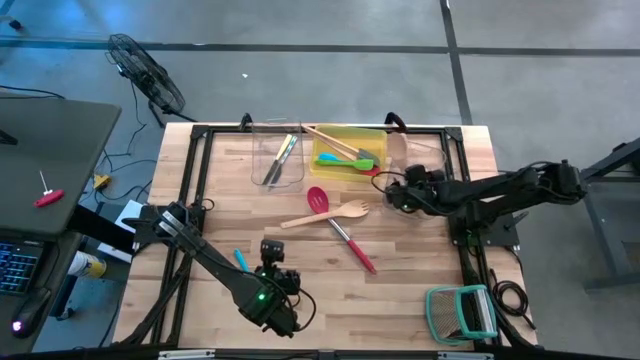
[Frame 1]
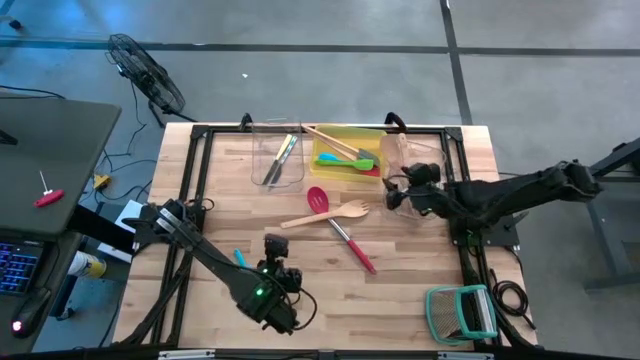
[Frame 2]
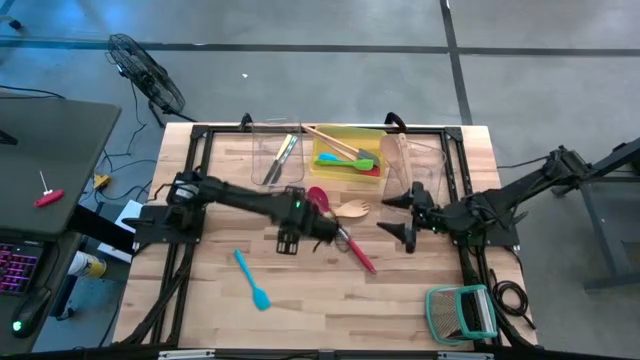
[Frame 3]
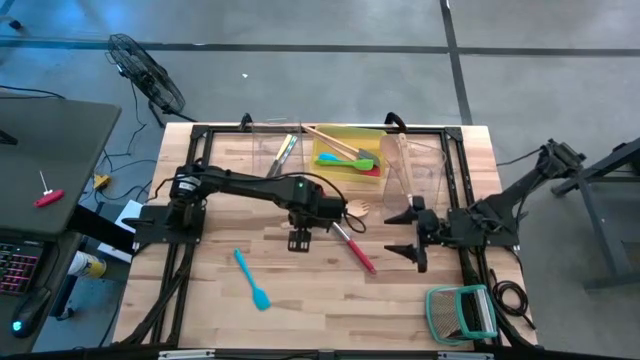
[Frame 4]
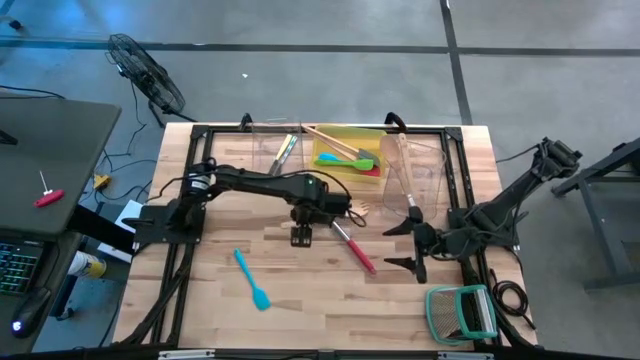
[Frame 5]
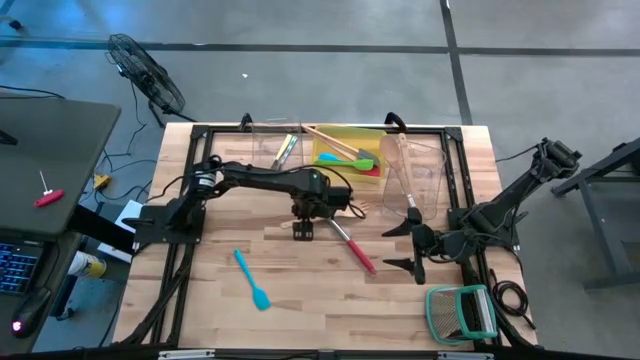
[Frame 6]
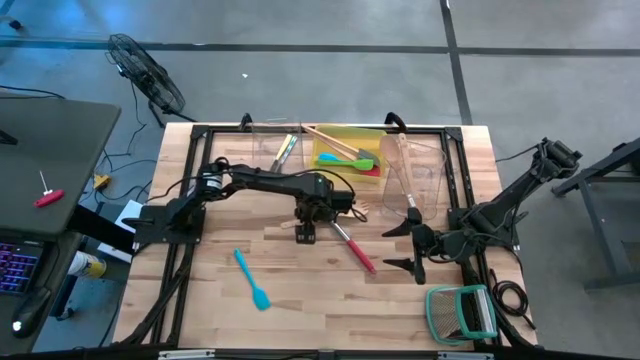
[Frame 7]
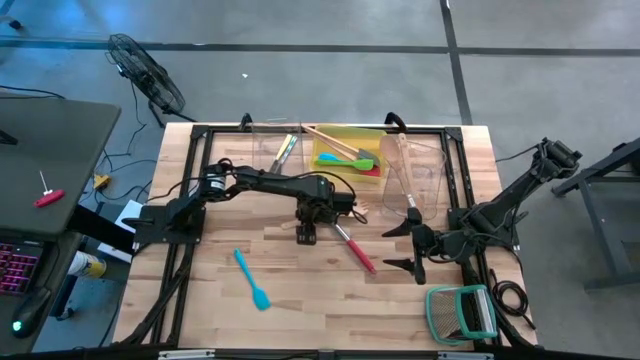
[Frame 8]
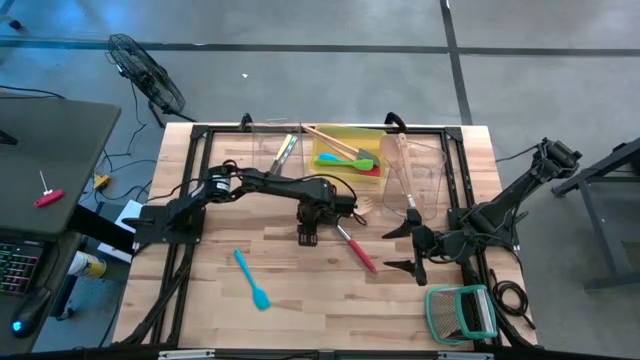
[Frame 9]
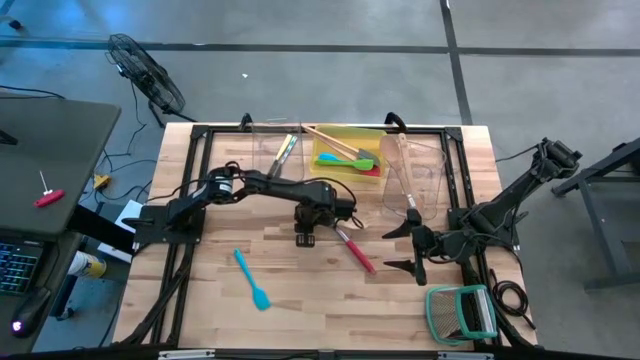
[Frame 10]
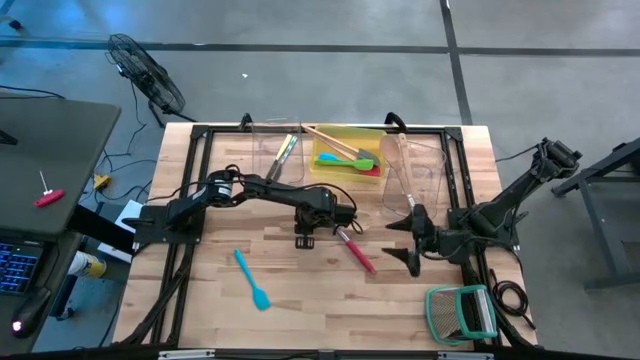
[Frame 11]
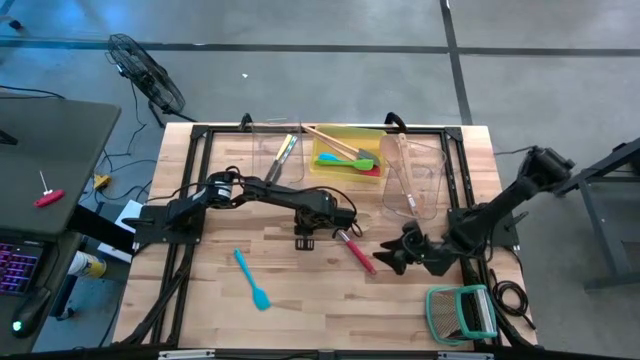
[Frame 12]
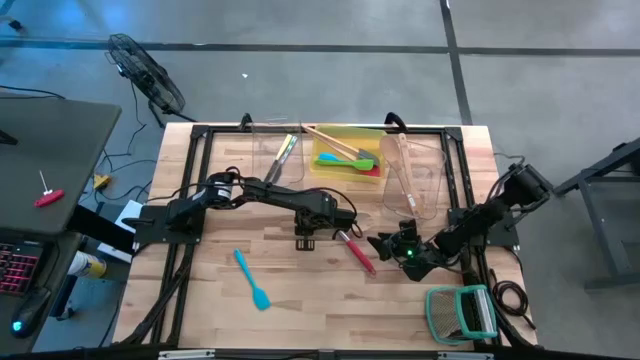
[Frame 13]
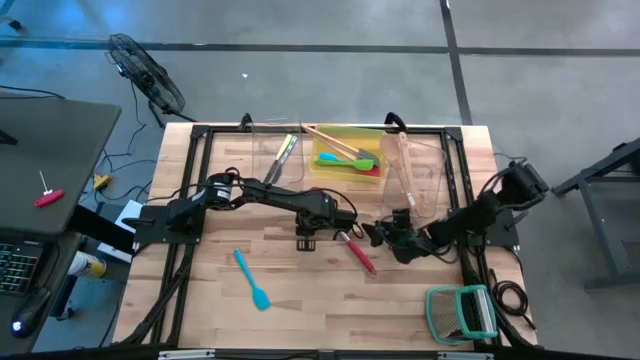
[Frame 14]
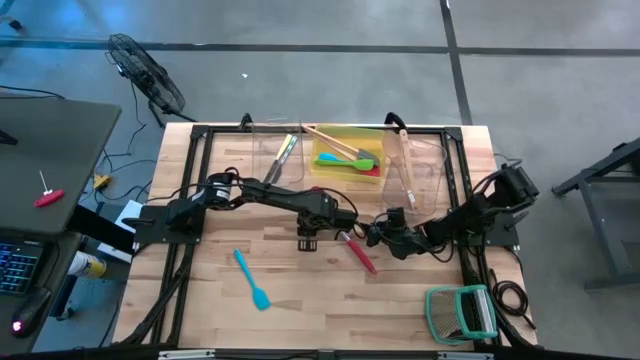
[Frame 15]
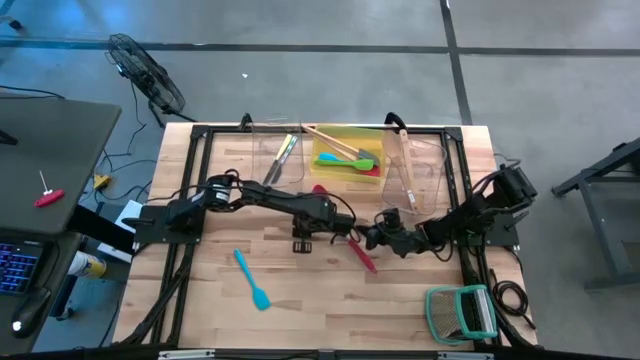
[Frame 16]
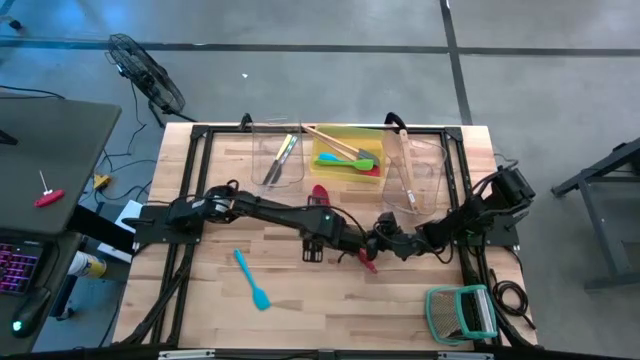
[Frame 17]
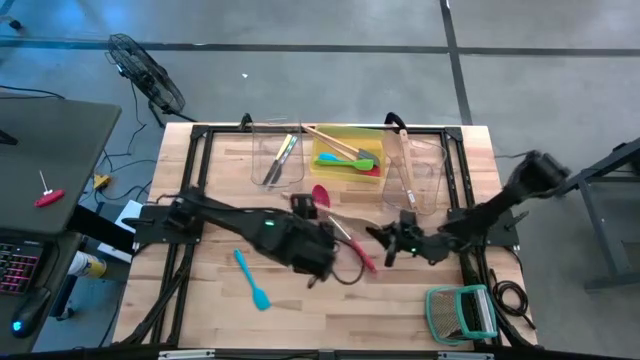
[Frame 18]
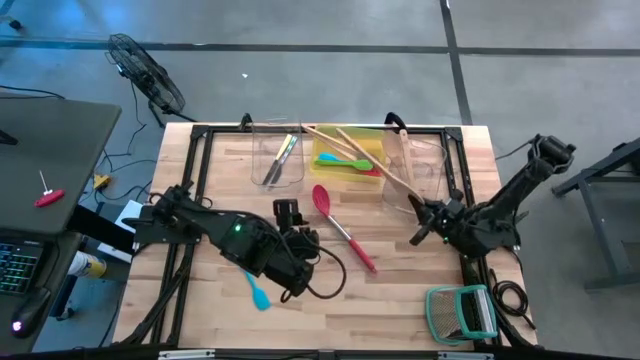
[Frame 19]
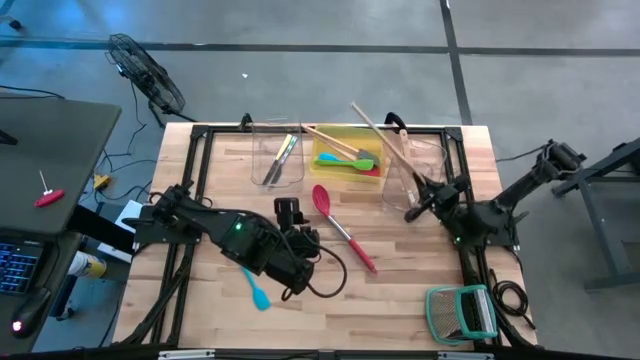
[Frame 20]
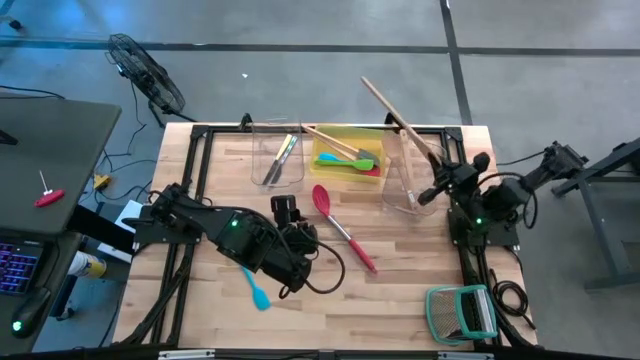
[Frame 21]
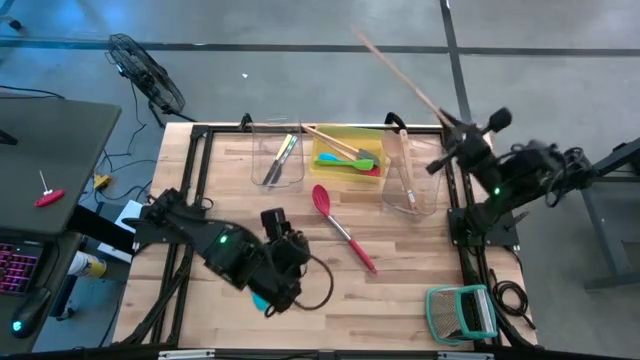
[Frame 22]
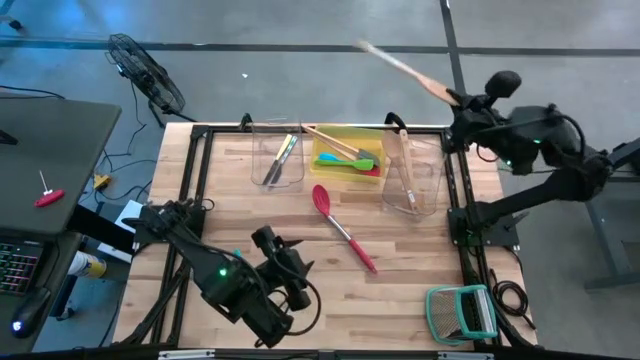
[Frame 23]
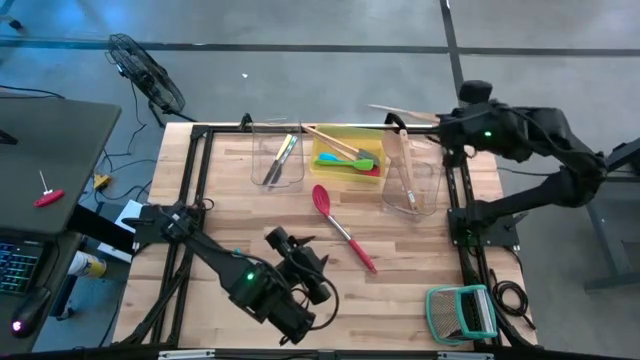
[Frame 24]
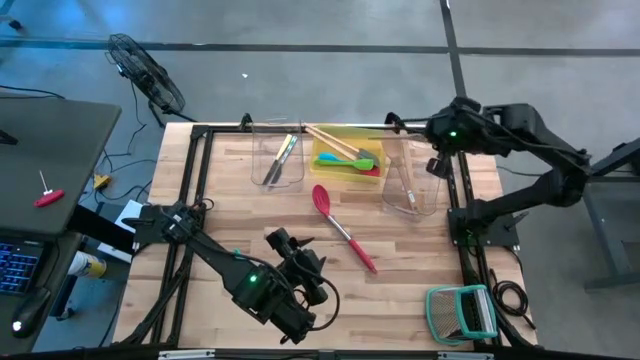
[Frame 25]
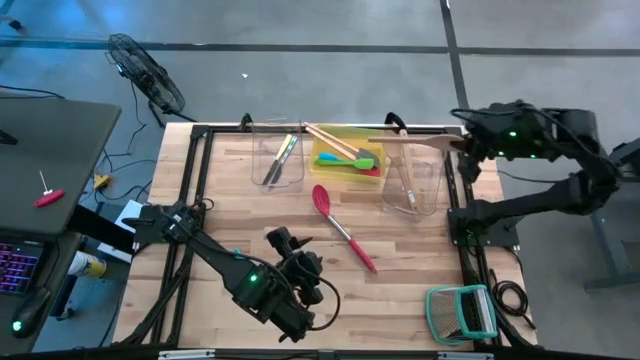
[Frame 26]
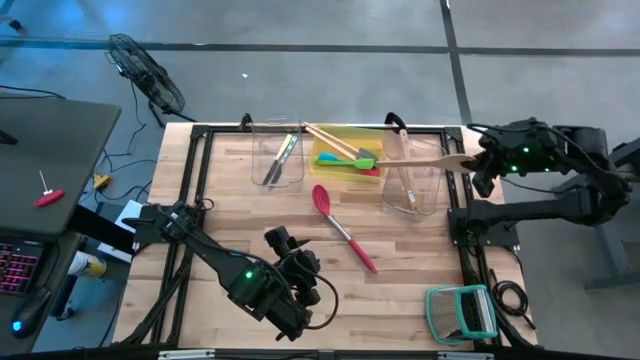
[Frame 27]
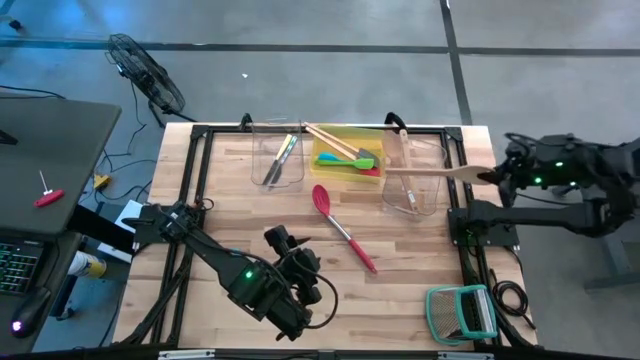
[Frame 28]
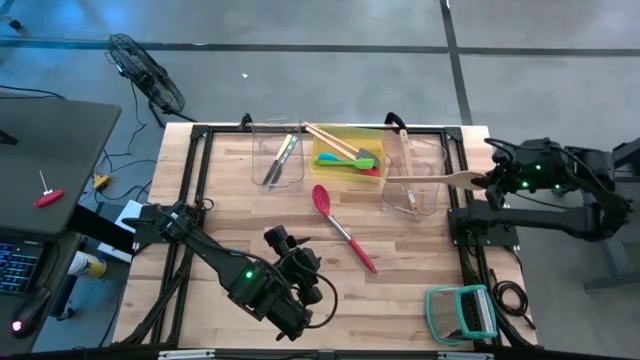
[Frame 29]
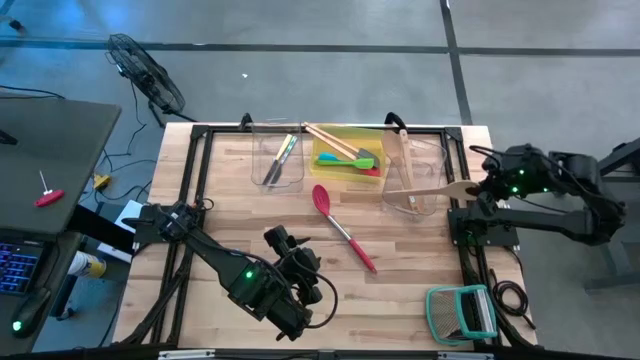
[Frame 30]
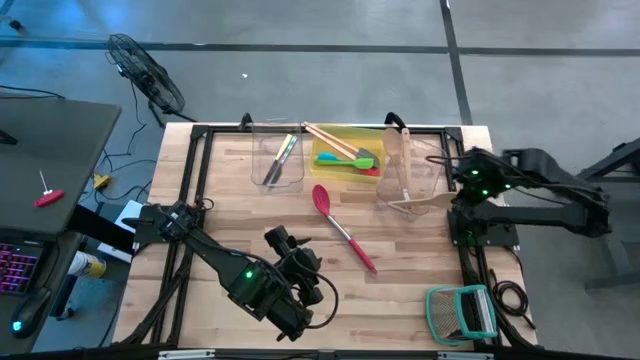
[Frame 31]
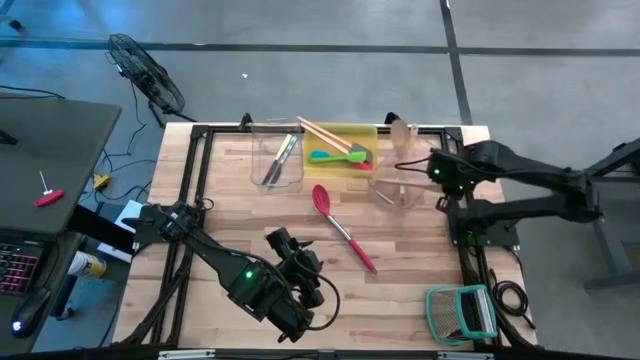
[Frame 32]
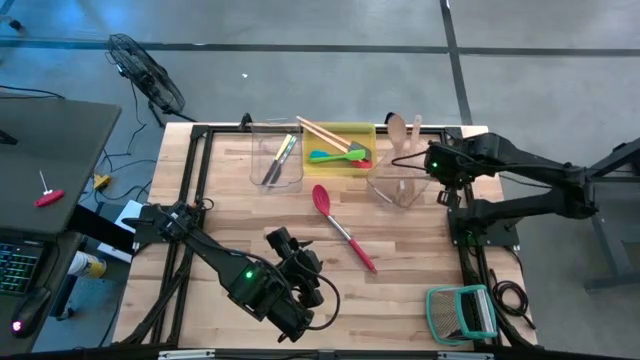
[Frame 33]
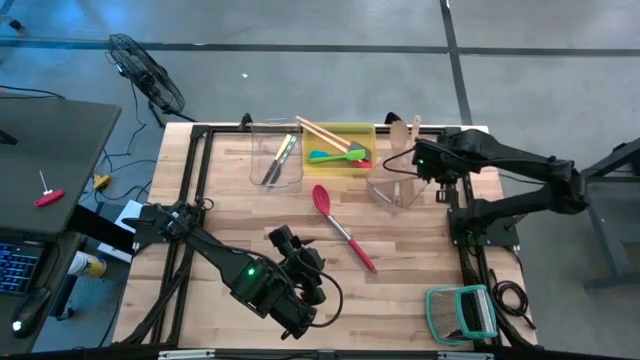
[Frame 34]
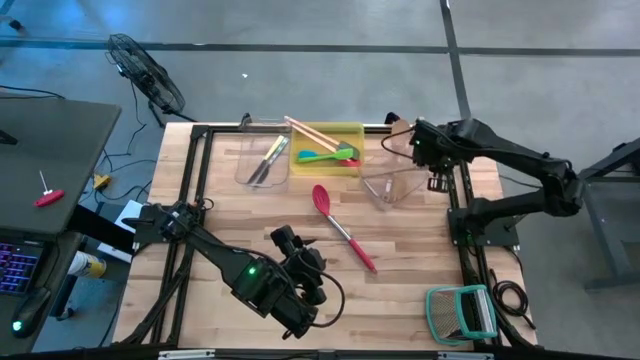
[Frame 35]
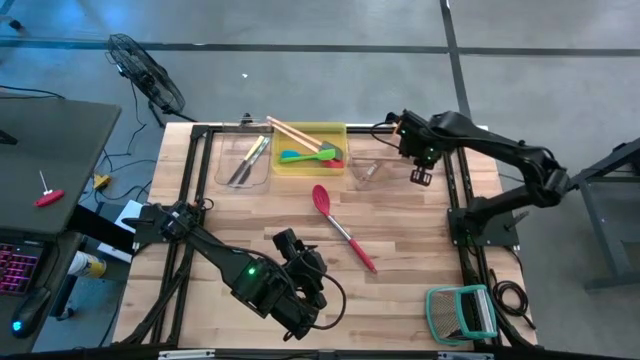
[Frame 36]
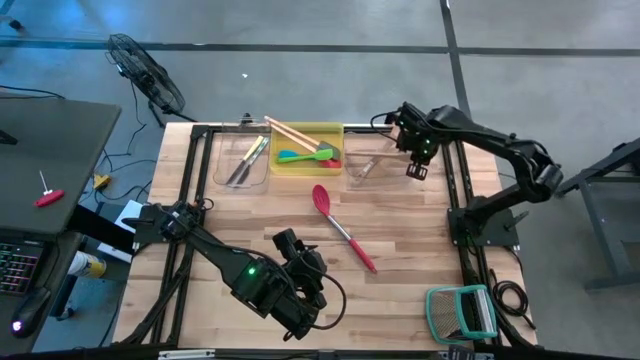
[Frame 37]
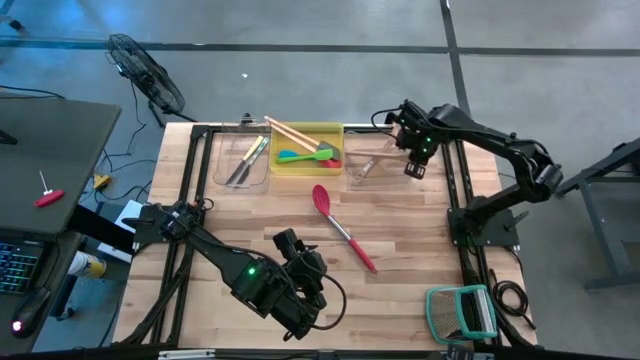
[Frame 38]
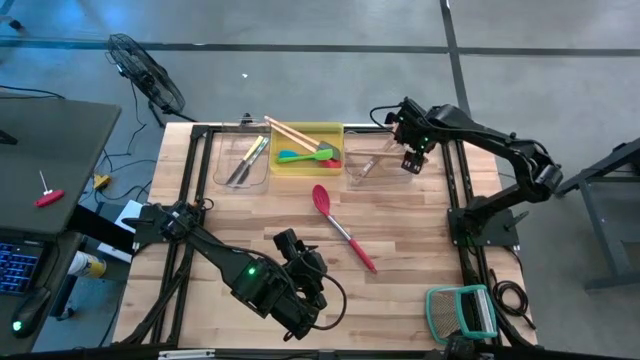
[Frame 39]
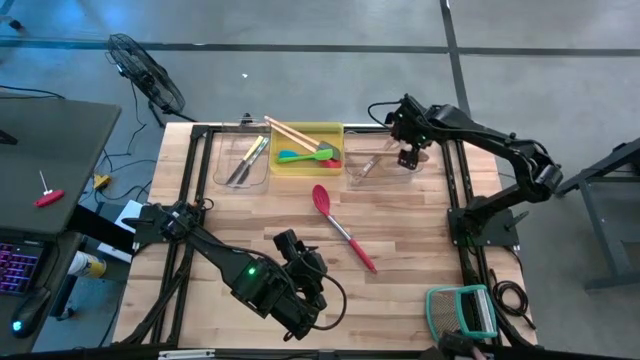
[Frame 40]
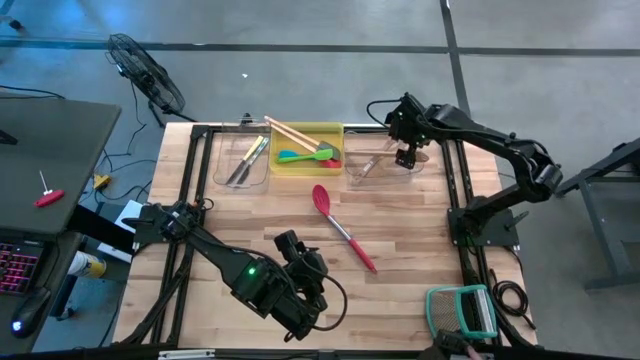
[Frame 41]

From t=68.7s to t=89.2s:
Task: Pick & Place Kitchen Items
Put the brown serving spoon into the right transparent bin

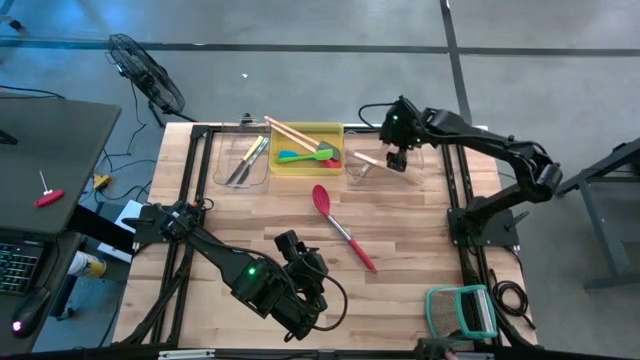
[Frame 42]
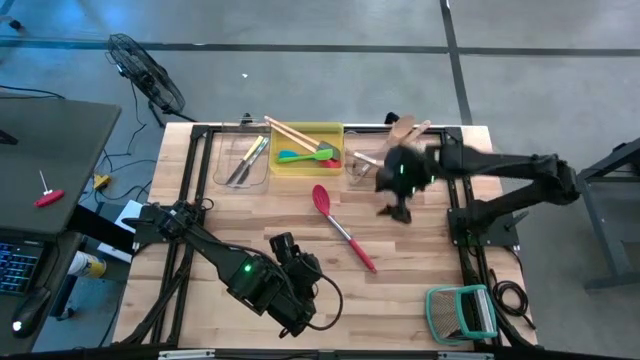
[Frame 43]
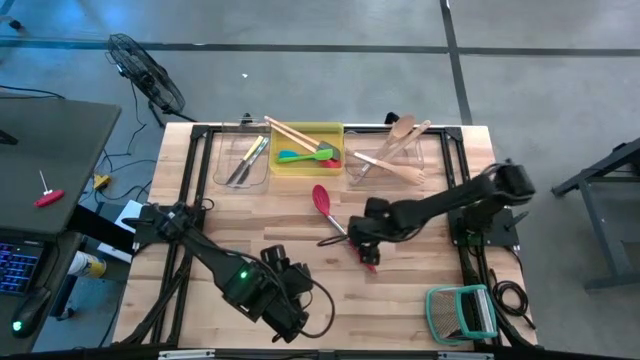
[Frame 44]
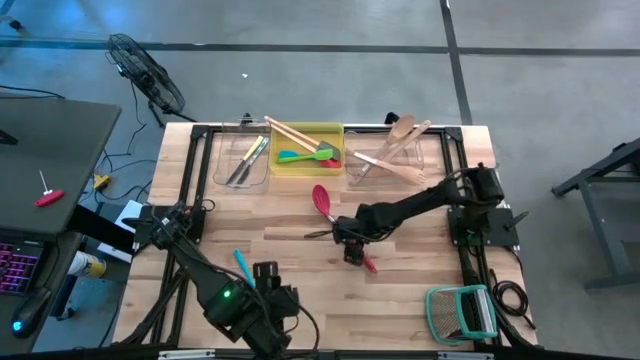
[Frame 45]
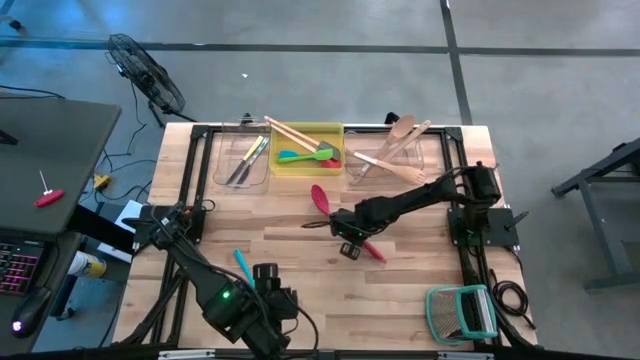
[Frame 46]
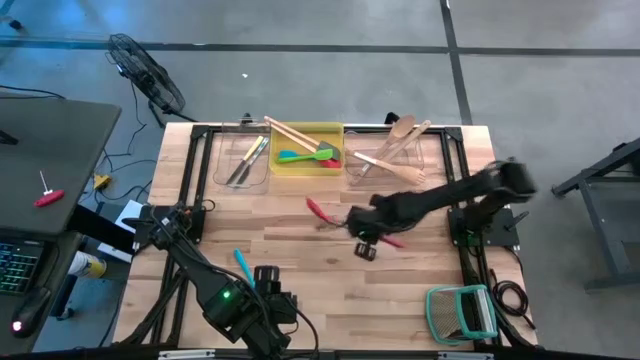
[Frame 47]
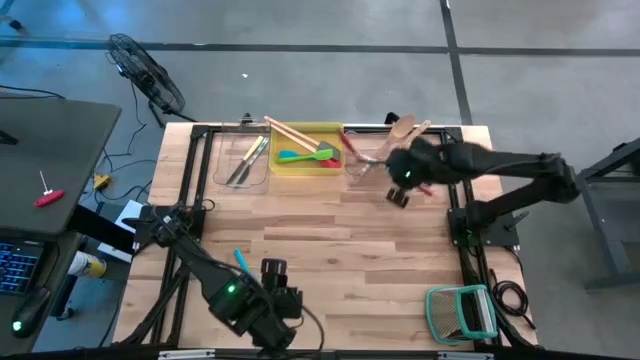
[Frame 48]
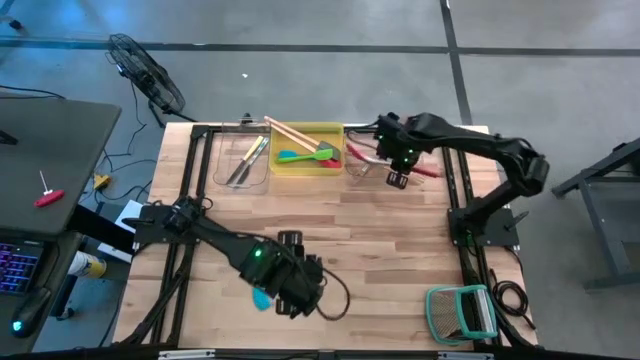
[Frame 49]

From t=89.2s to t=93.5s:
Put the red serving spoon into the right transparent bin
